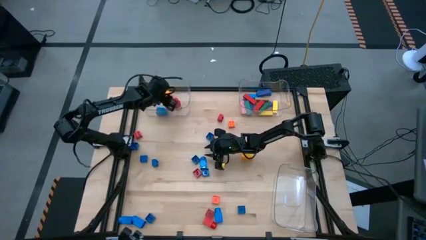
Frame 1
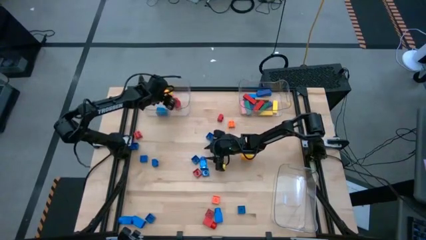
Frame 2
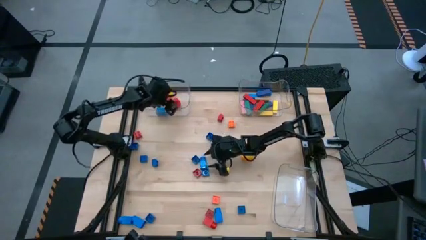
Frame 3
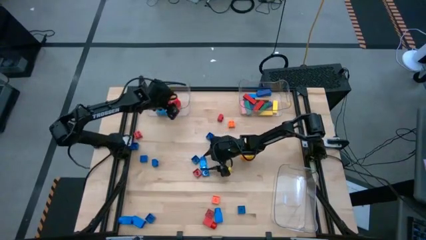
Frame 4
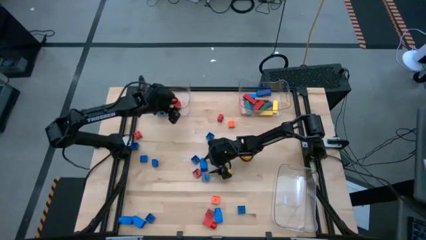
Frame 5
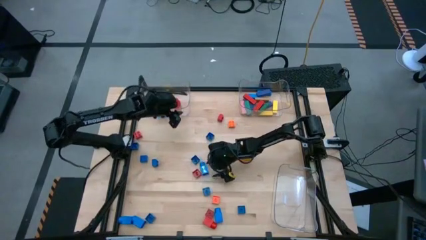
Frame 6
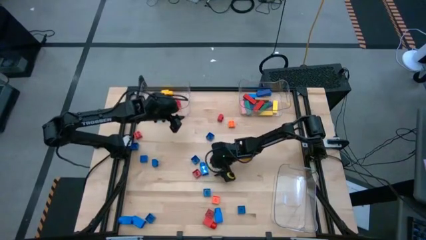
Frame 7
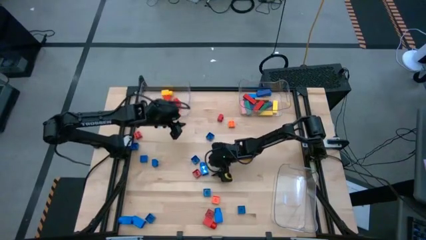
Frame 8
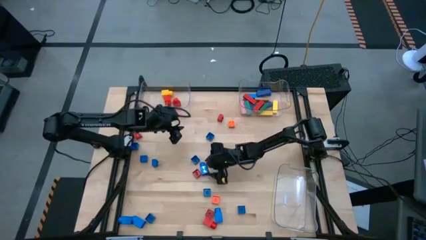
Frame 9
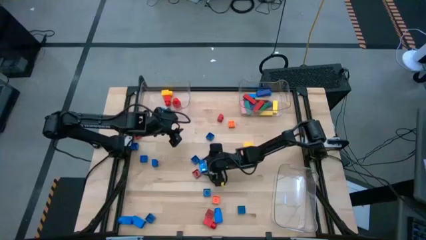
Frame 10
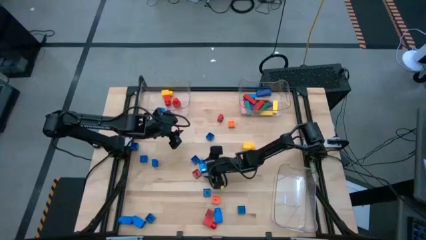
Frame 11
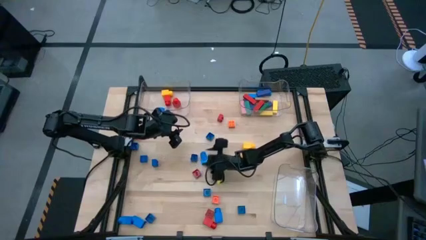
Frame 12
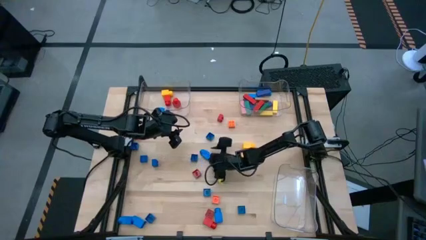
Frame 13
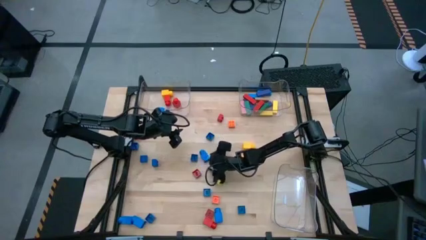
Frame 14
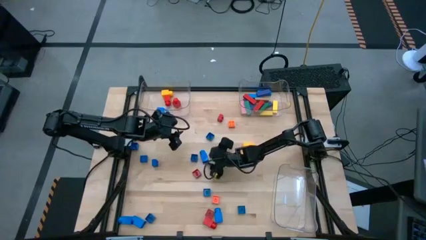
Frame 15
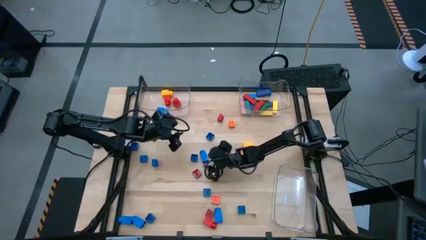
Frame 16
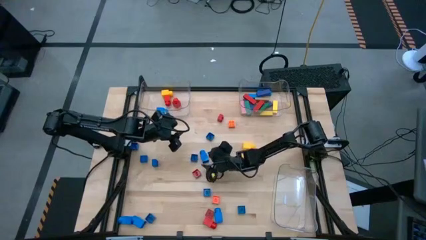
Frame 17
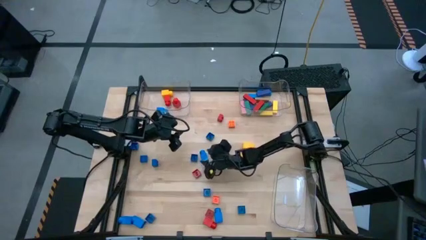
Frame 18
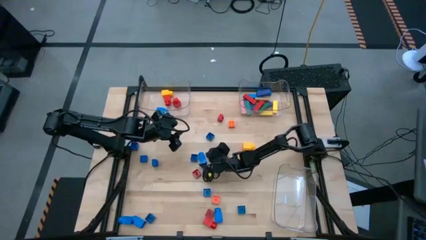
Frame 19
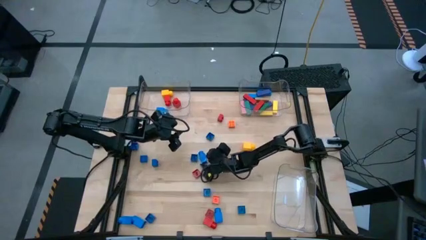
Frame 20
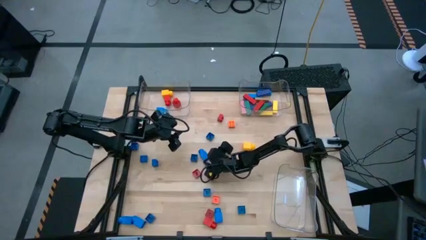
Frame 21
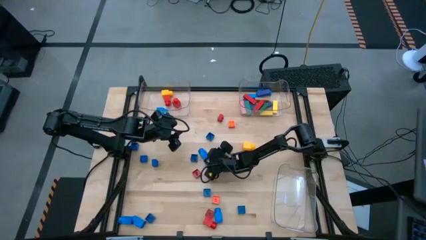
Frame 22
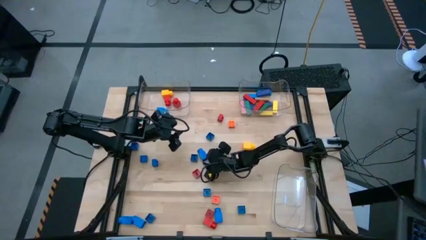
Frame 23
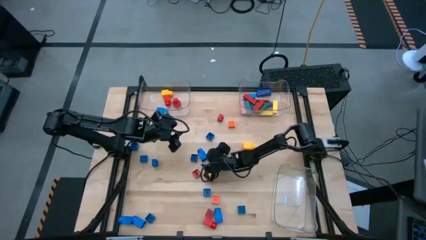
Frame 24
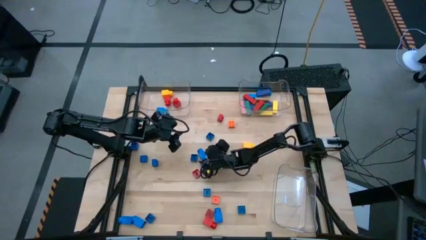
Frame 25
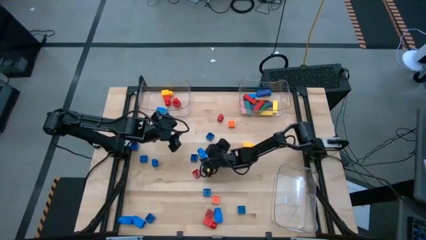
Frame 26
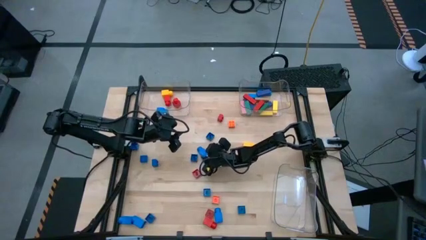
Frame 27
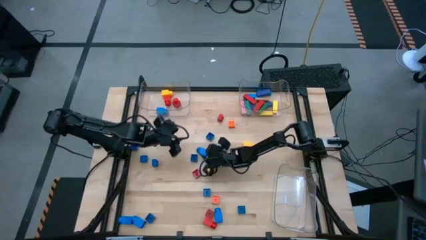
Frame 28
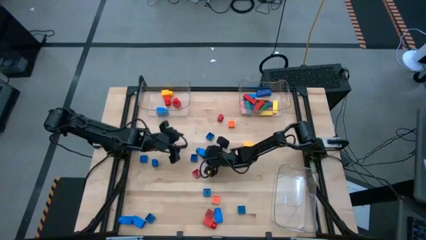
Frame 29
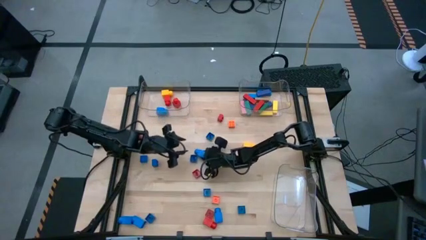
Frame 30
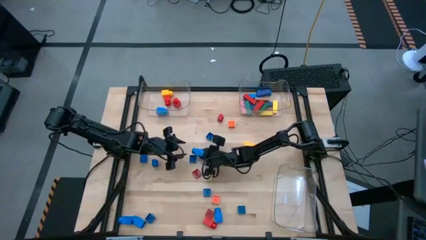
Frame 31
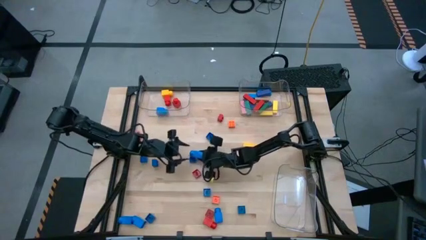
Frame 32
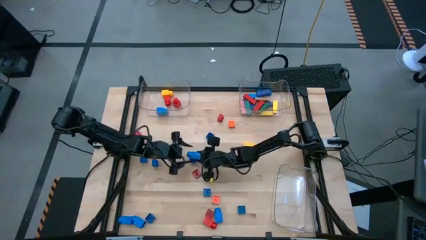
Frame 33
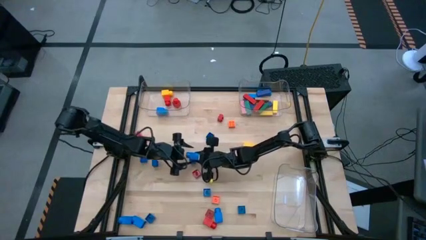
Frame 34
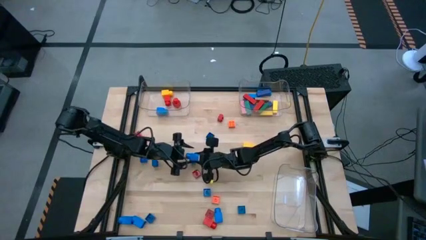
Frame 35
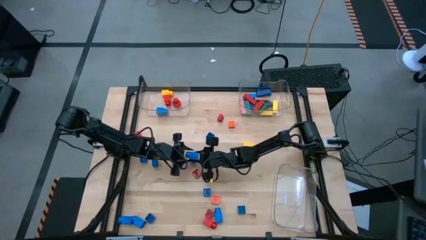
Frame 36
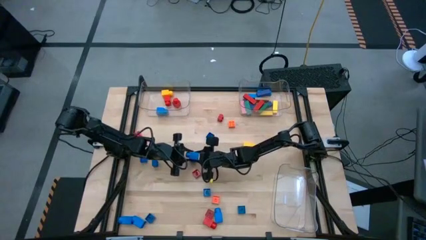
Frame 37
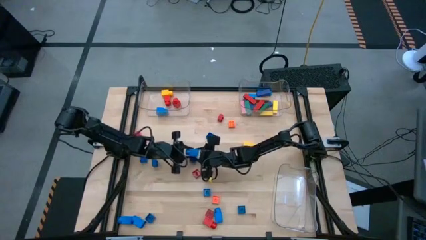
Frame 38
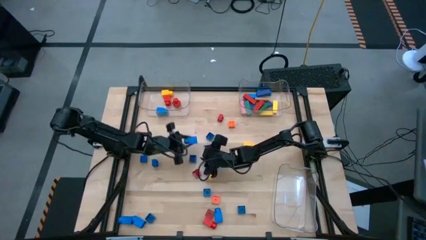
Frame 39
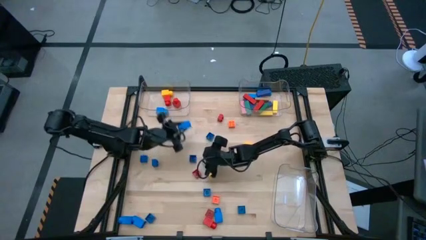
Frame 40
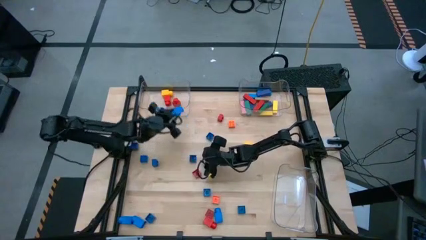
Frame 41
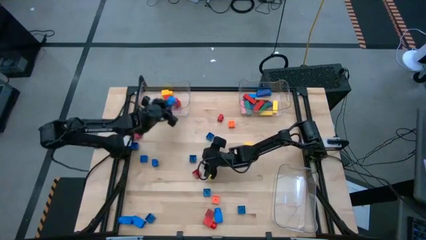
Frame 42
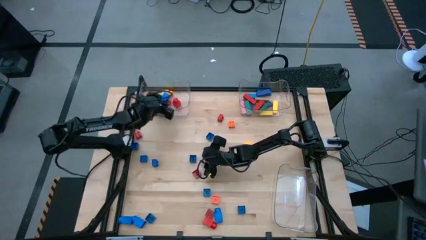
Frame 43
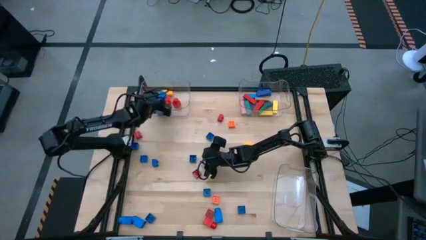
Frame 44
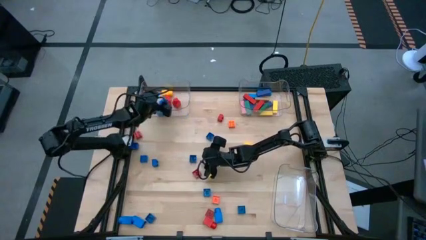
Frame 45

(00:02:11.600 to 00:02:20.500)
Task: Sort blocks by size
Put the 1 stud blue game piece into the top left transparent bin

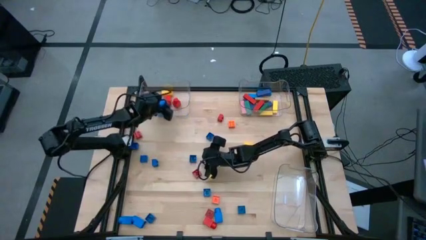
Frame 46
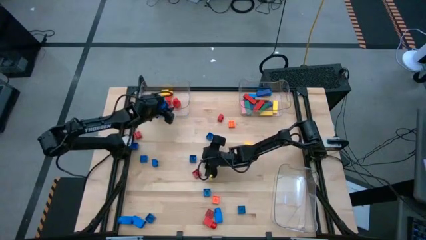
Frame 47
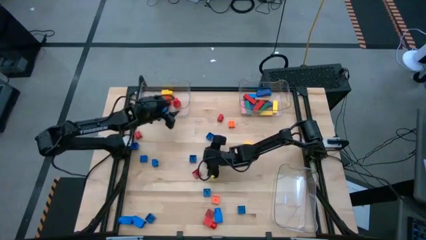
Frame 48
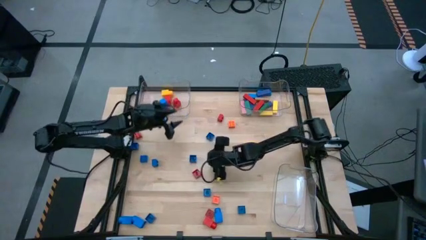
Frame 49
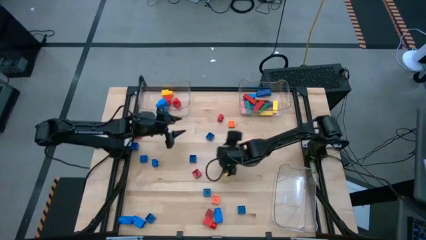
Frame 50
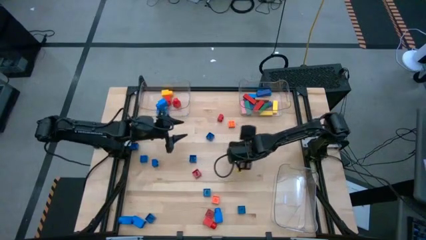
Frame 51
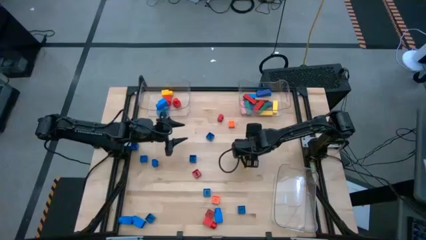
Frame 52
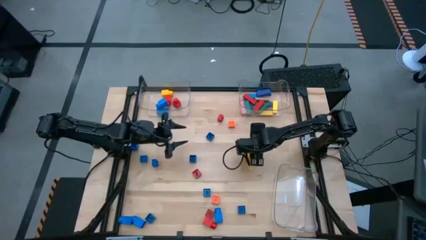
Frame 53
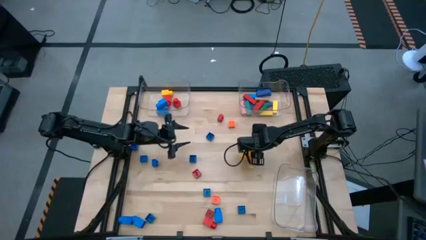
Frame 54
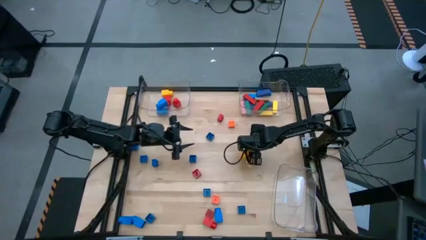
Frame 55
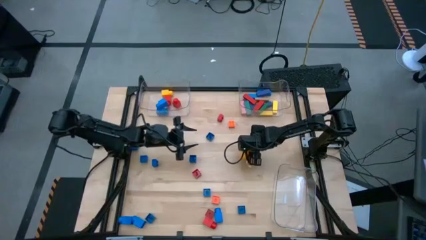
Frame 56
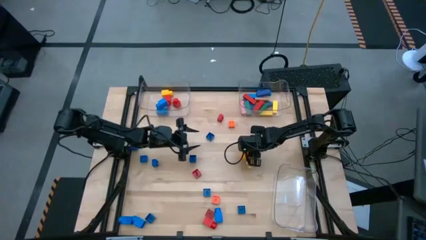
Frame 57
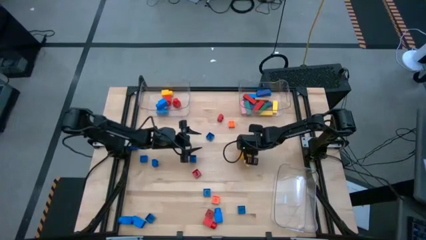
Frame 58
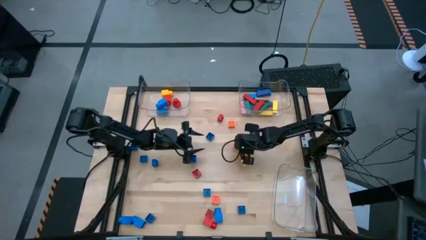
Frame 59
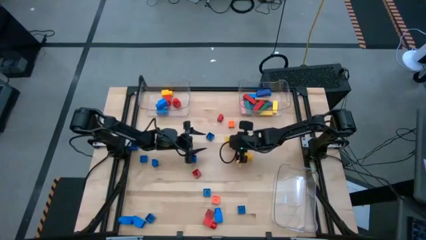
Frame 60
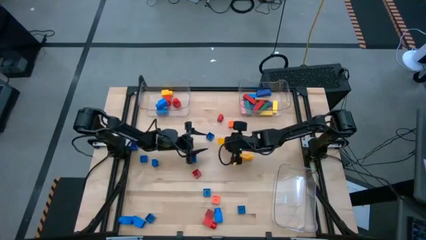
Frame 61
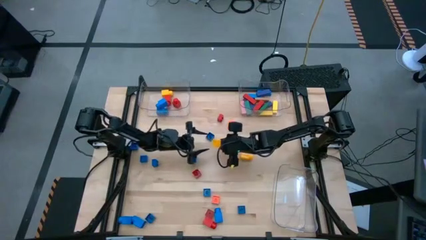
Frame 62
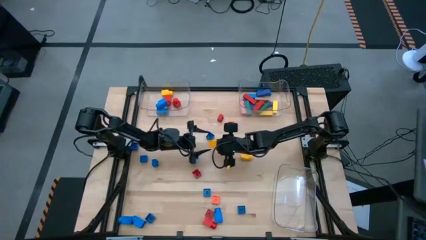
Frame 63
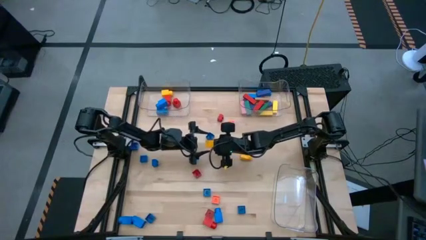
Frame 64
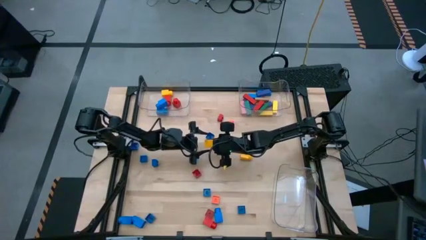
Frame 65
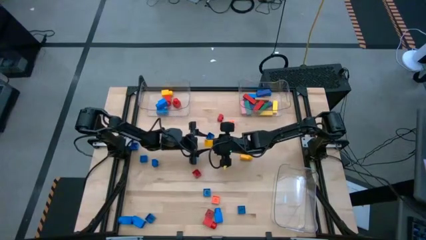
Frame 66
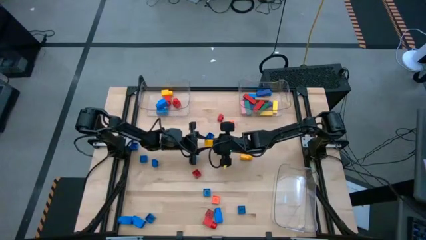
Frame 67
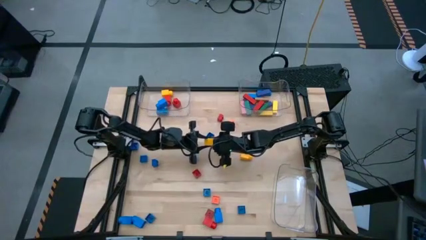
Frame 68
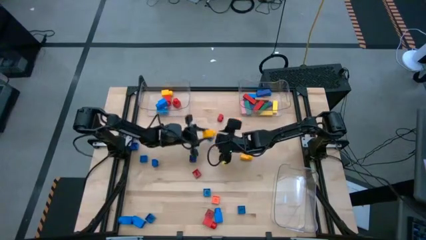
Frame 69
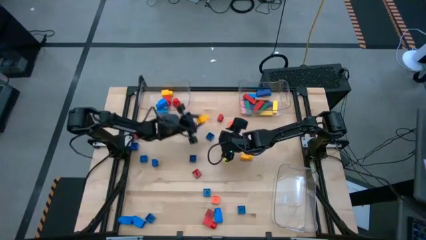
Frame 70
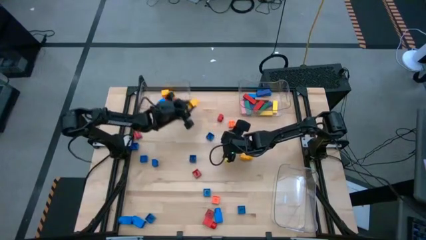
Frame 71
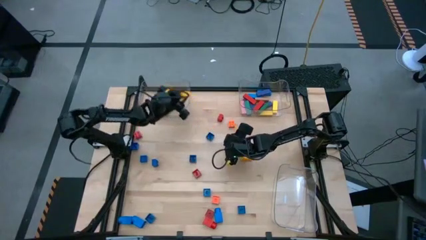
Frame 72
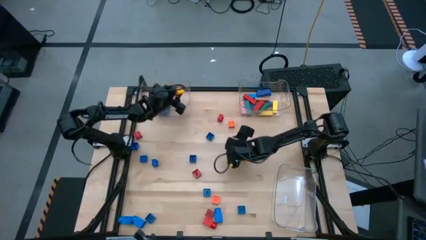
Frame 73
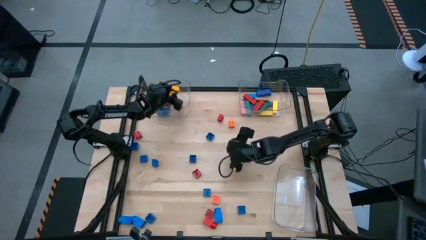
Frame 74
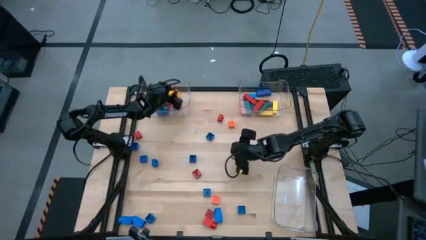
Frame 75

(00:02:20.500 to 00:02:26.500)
Put the 1 stud yellow game piece into the top left transparent bin

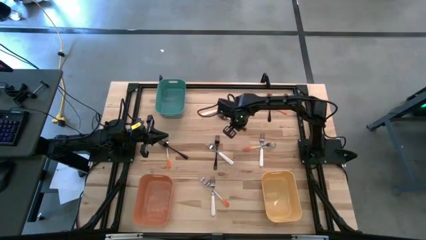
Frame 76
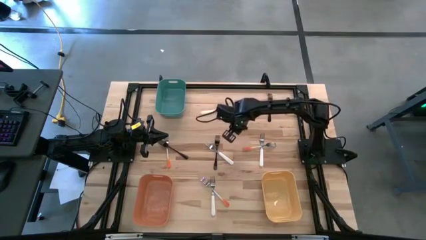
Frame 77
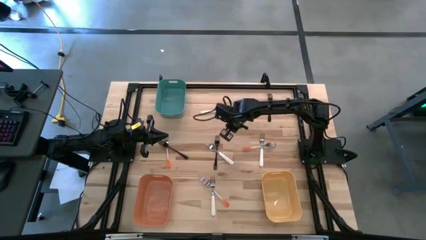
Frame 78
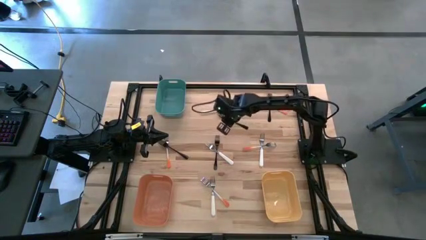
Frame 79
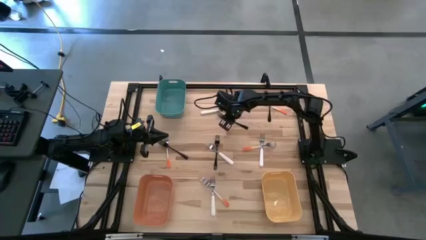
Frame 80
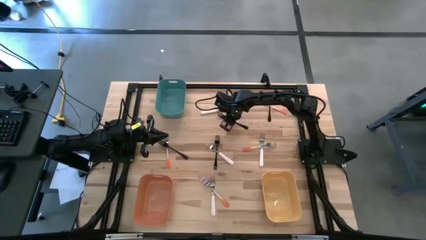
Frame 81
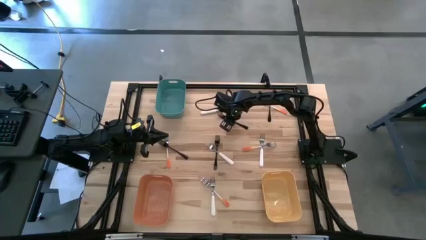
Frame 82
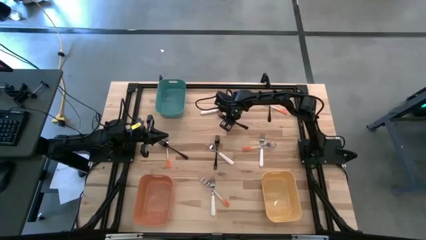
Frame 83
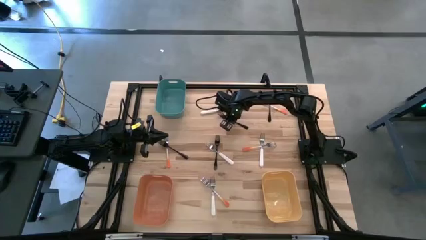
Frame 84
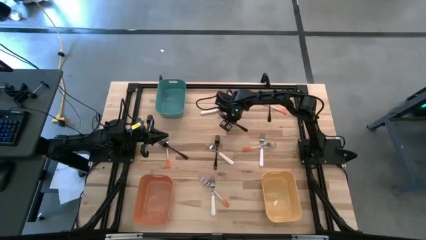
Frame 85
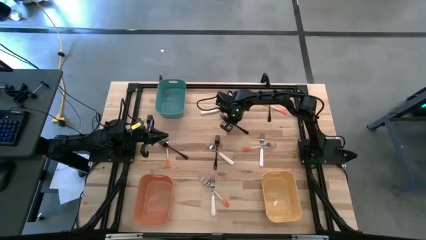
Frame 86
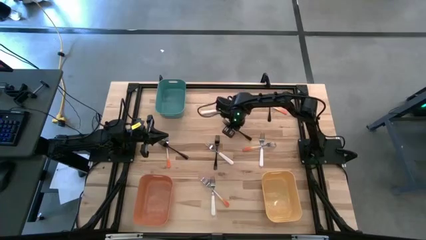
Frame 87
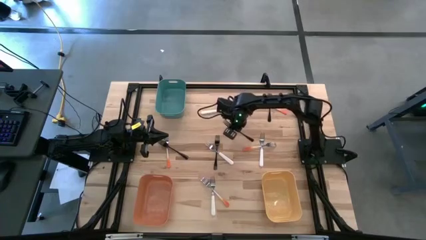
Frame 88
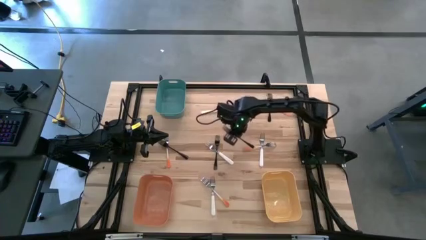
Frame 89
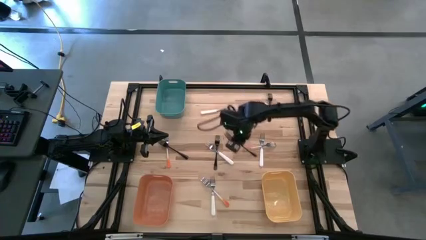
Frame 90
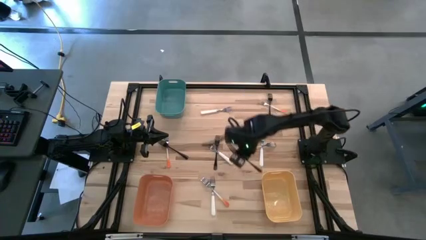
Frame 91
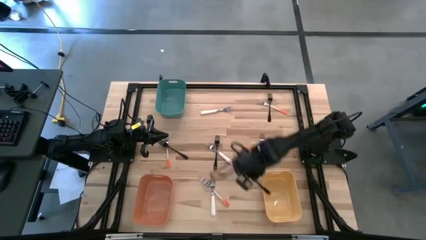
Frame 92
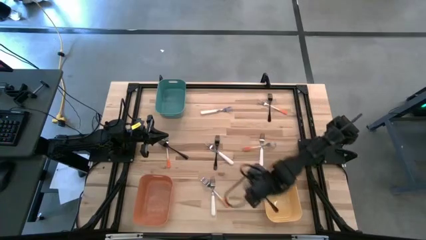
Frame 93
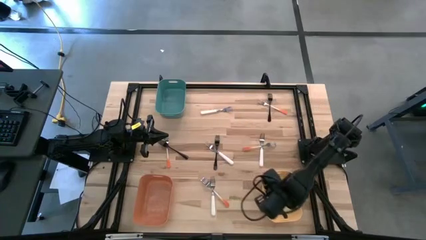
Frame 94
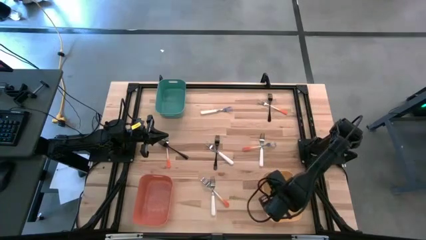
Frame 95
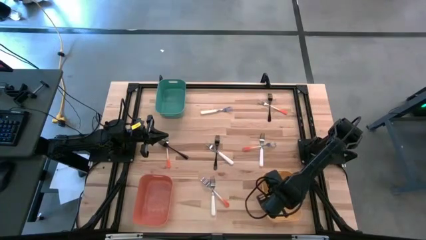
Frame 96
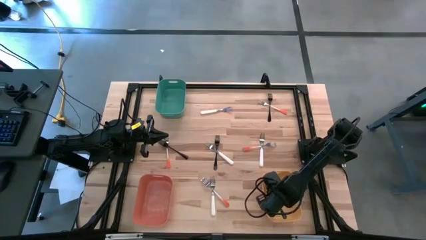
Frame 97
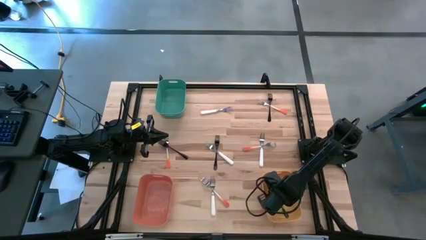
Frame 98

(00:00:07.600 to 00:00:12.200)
Task: Sort silverware by color (type)
Put the black fork into the yellow bin
